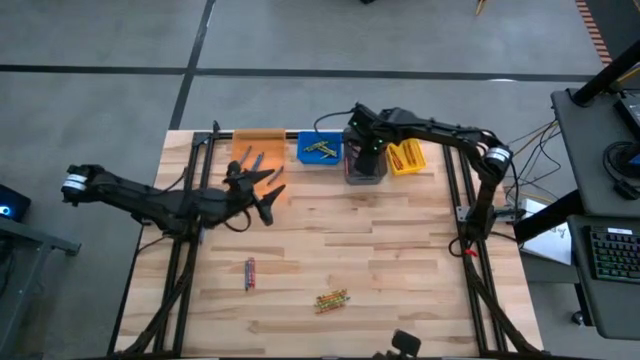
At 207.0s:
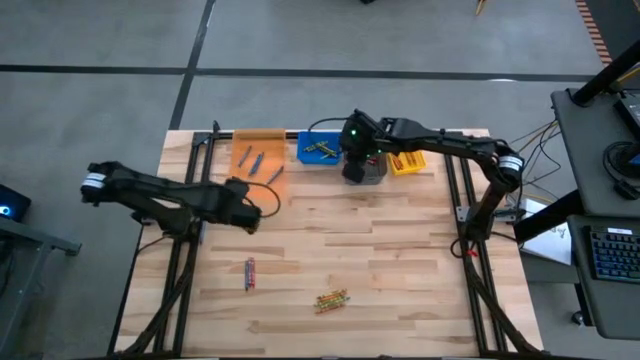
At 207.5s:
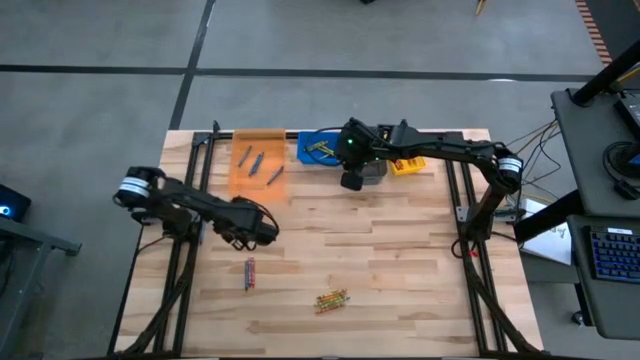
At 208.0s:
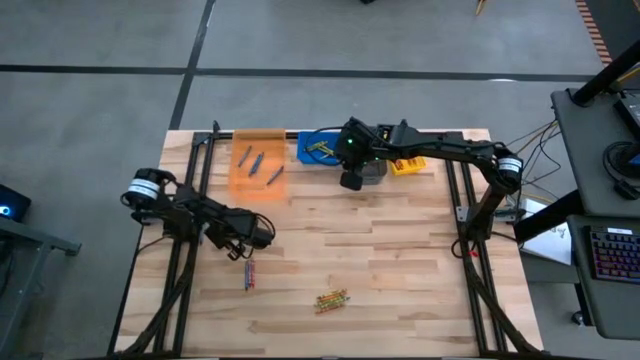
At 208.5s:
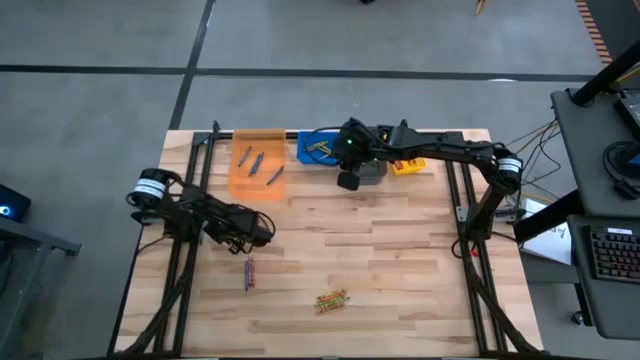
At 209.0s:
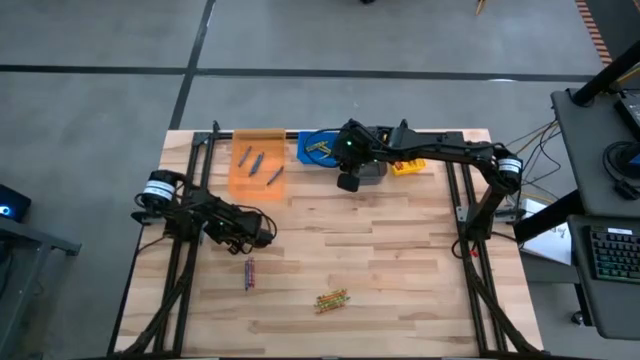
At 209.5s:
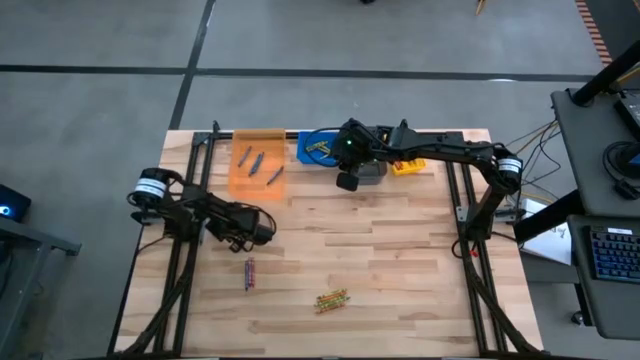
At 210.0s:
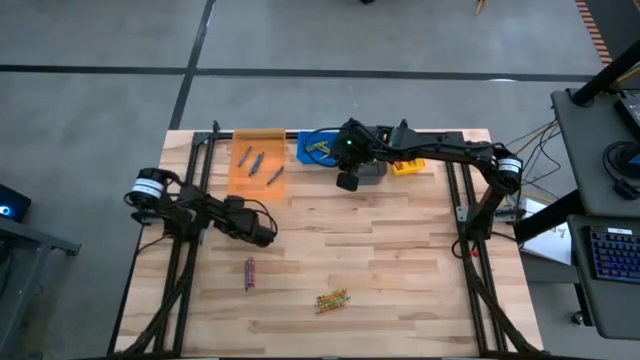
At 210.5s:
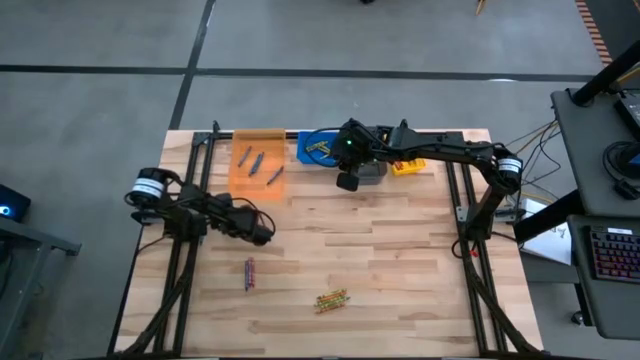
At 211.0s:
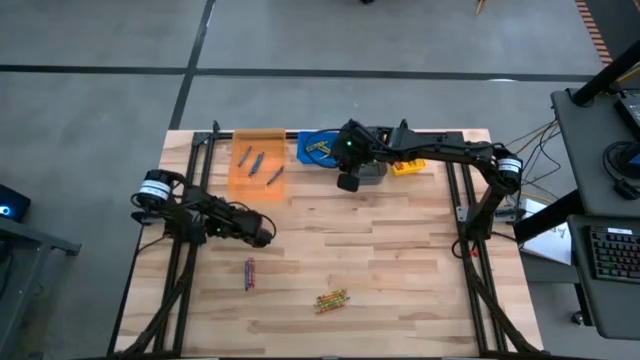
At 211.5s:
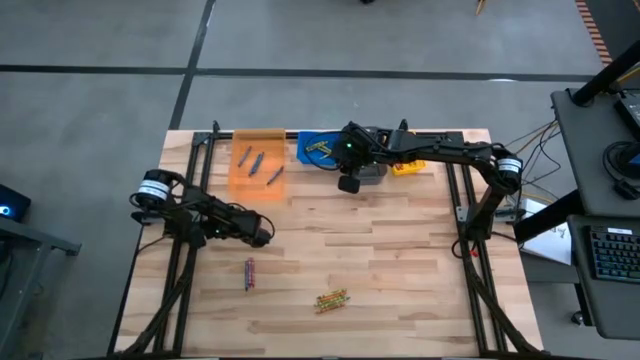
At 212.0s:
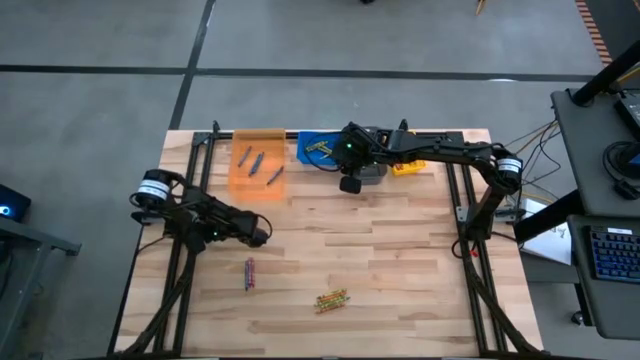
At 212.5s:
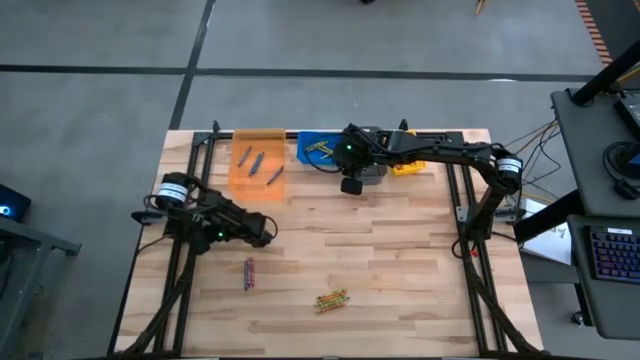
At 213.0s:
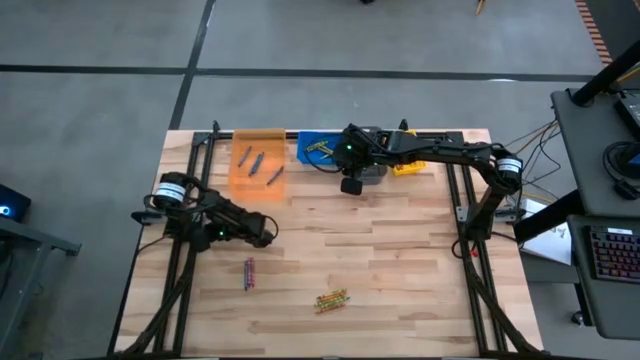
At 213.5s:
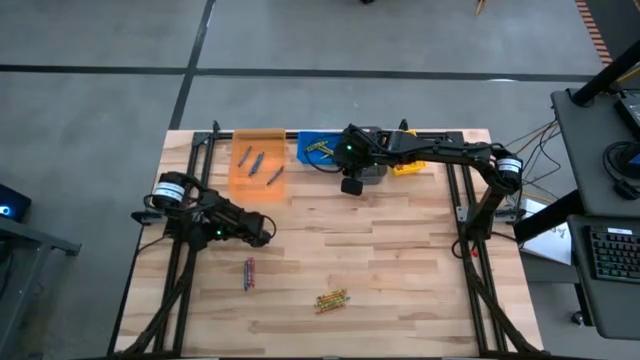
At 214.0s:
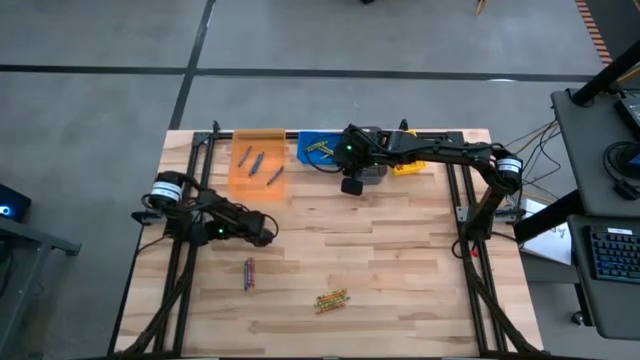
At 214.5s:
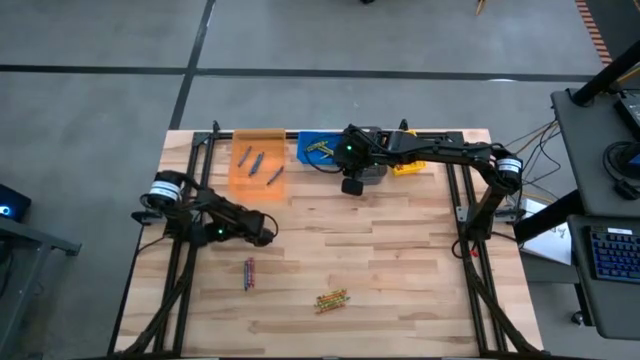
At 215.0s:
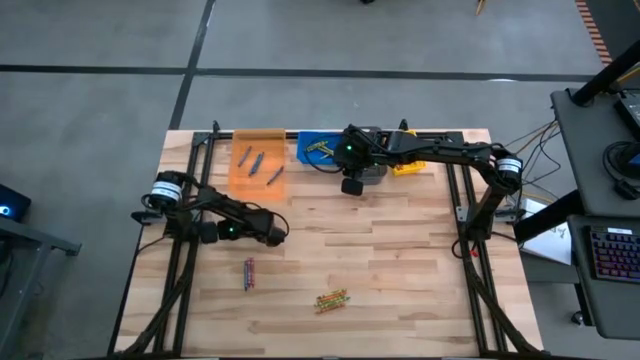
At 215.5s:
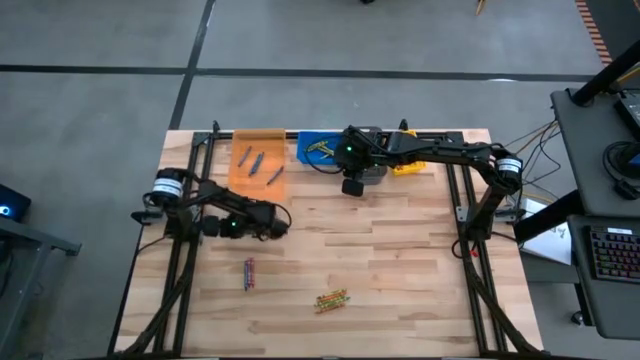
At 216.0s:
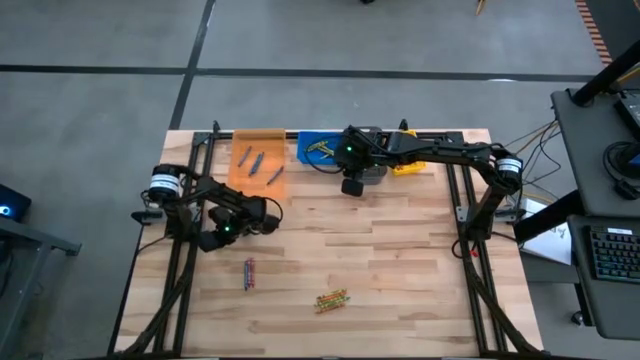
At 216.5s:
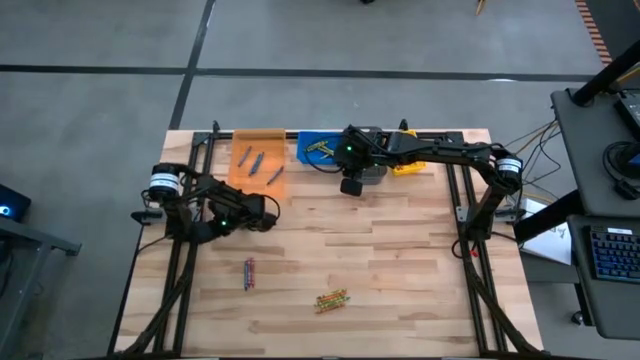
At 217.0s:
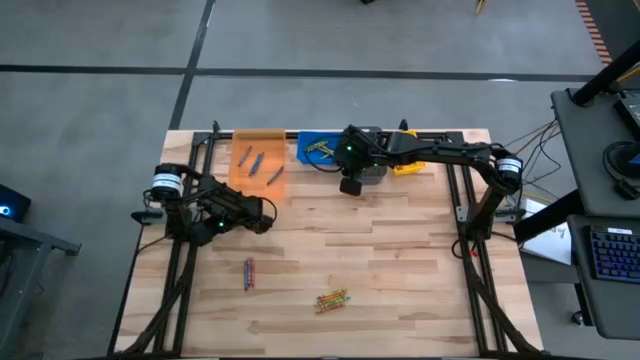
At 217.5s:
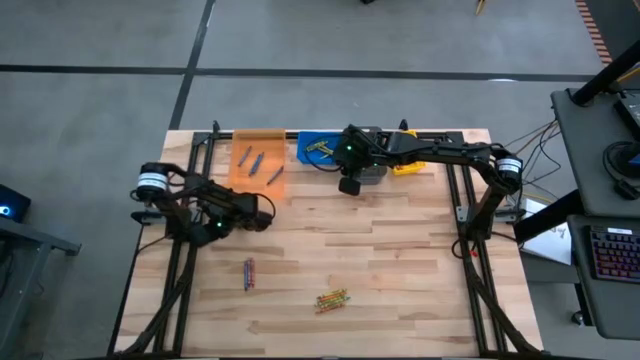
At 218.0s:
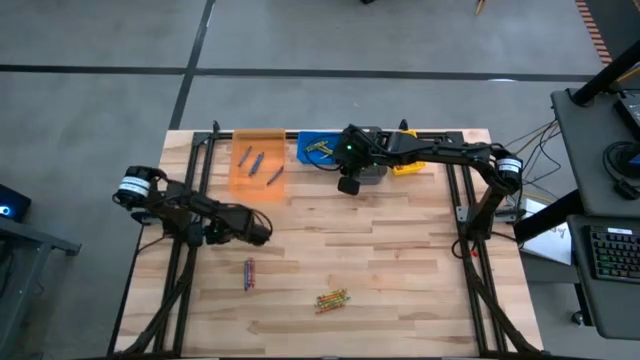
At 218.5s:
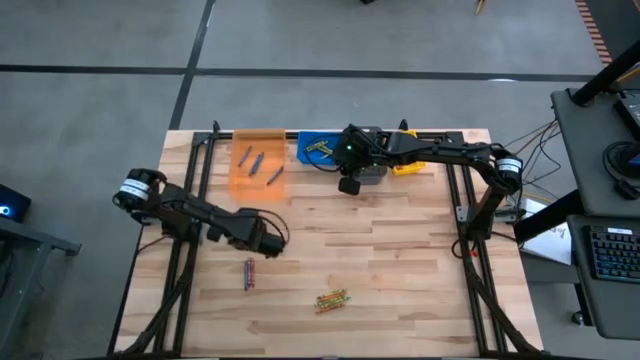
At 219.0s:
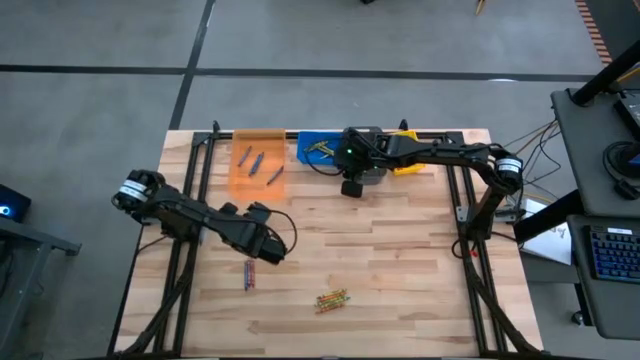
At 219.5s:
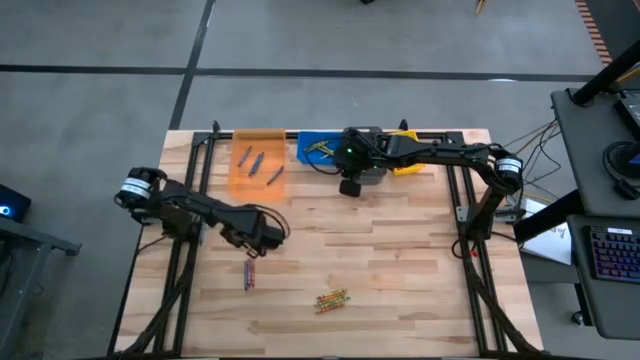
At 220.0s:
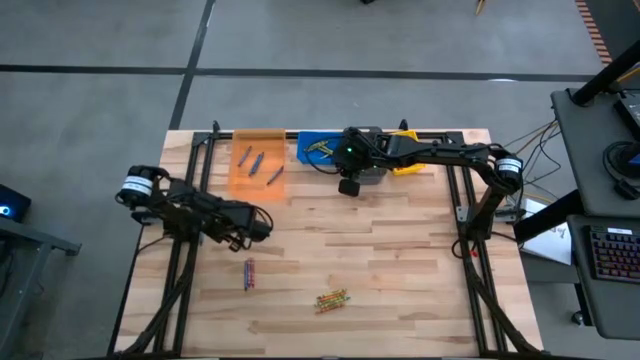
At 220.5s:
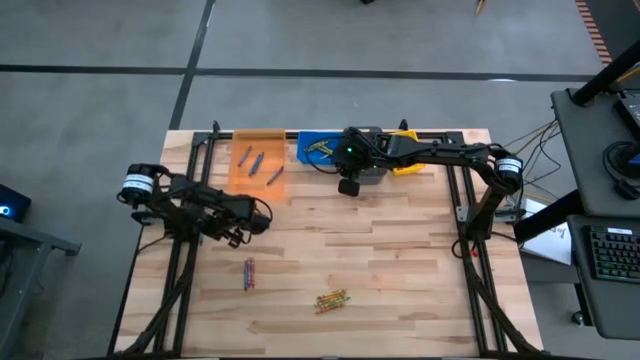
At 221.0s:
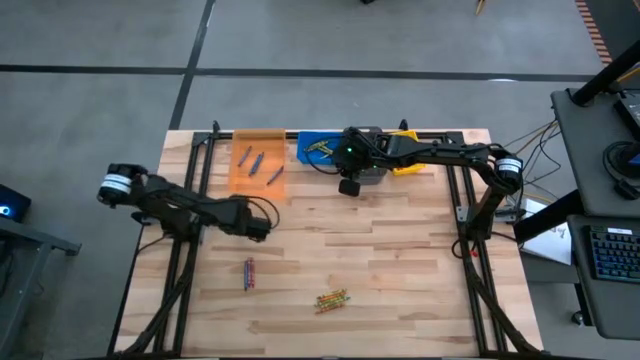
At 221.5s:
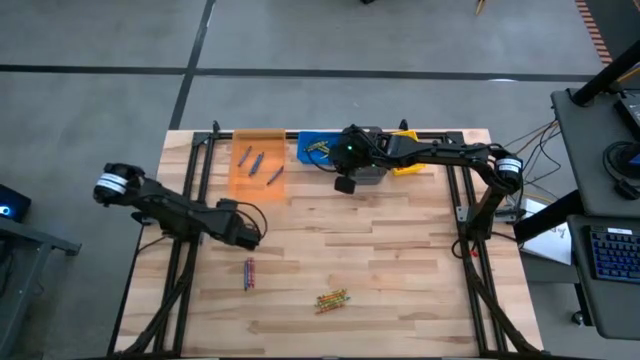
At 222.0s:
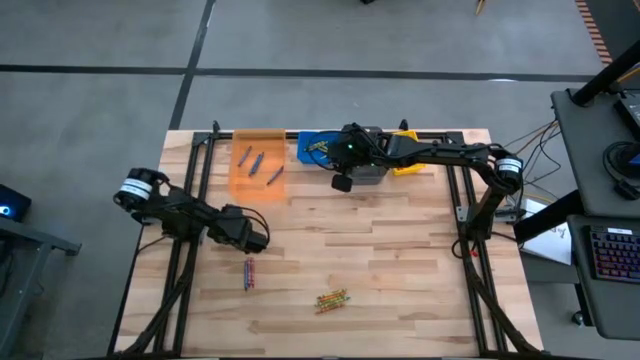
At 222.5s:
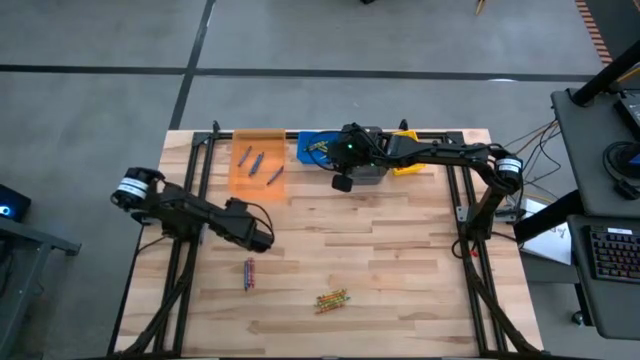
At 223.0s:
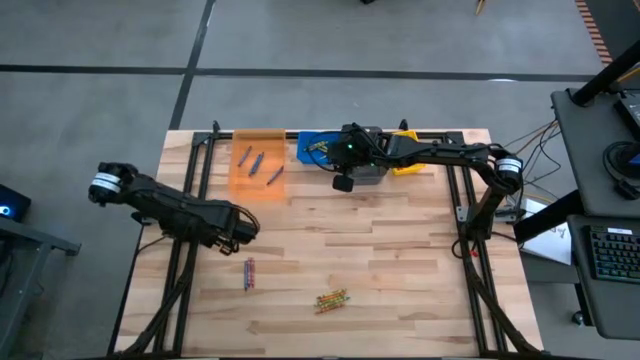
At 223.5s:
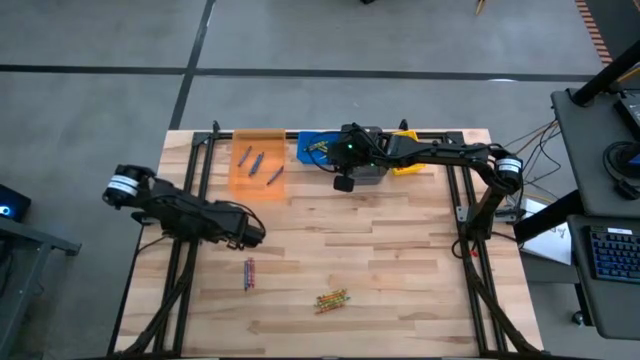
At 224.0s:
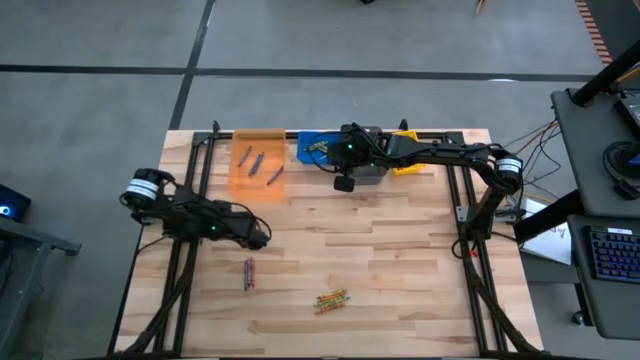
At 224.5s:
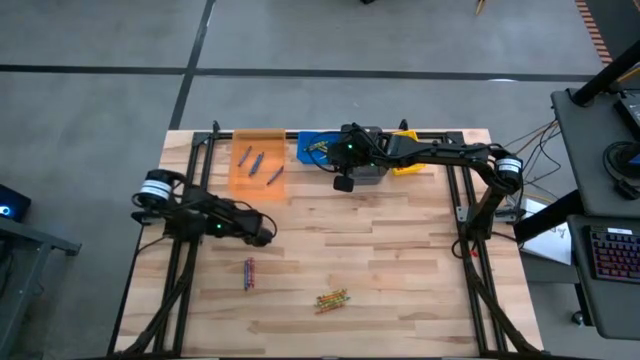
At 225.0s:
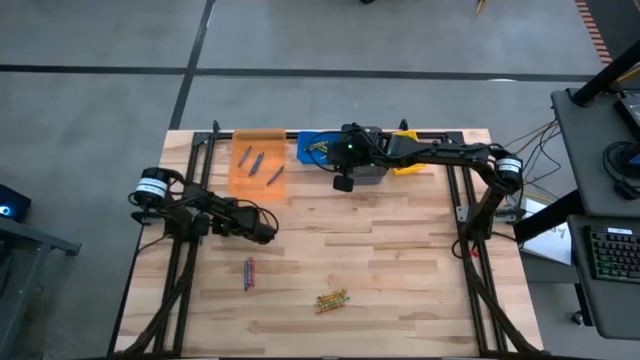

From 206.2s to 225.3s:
Task: Sort crayons
Put the blue crayon into the orange bin

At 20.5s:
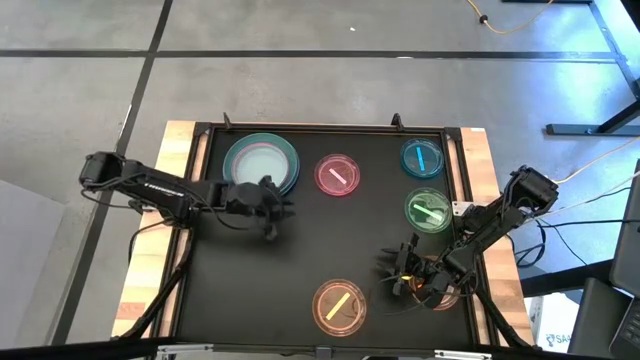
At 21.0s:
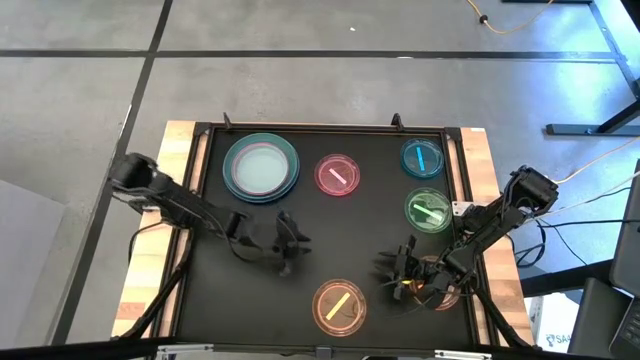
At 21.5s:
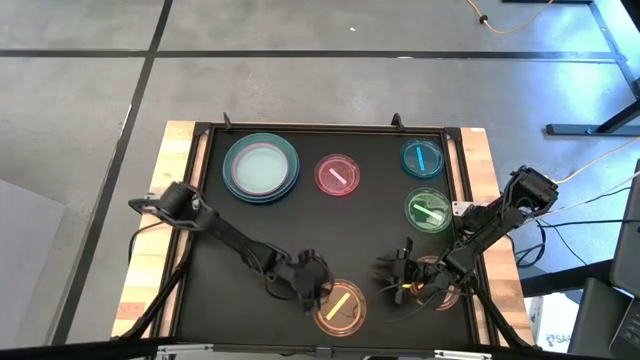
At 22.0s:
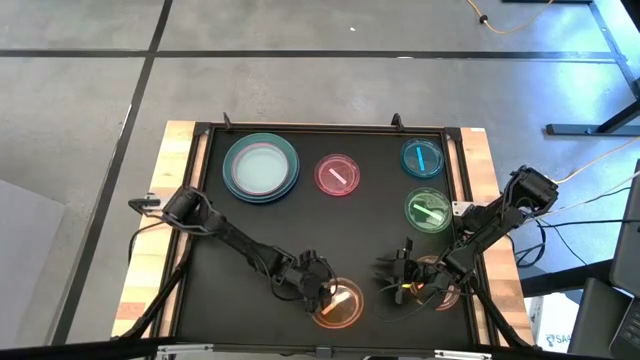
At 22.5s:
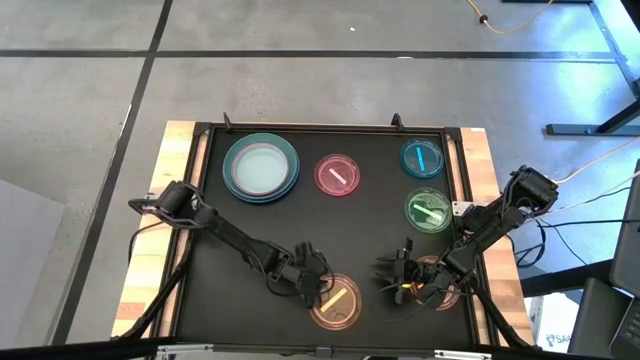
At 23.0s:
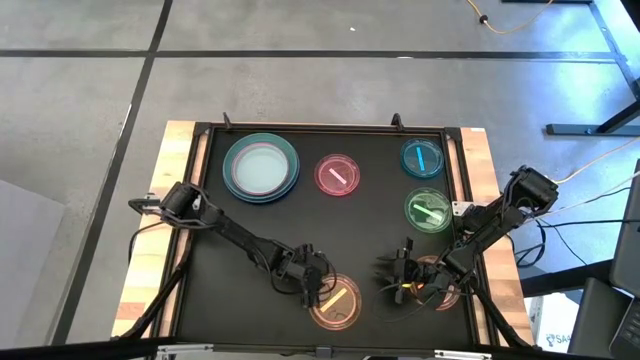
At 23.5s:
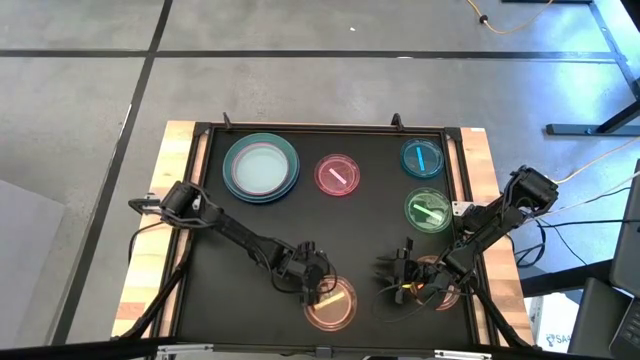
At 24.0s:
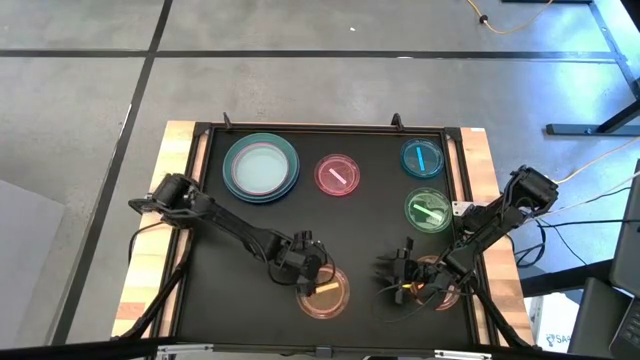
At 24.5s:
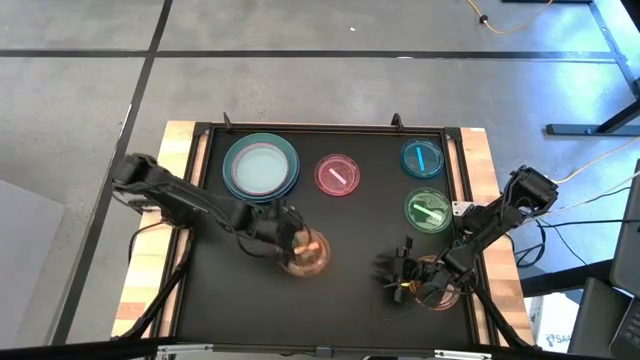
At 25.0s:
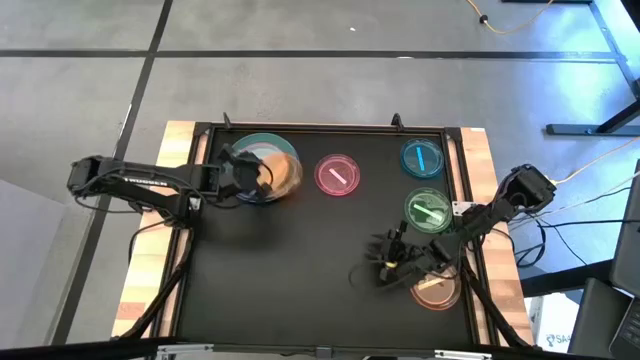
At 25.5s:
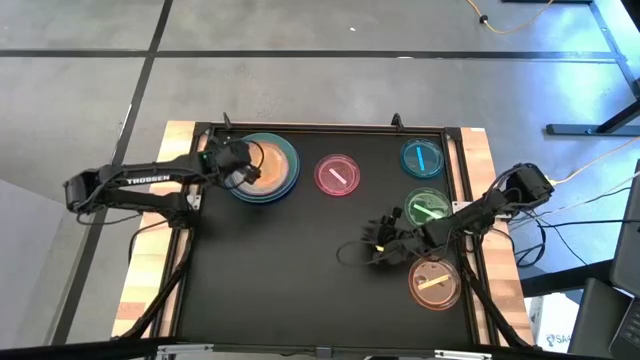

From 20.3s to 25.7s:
Task: Stack plastic plates
Stack the left orange transparent plate on top of the gray plate
